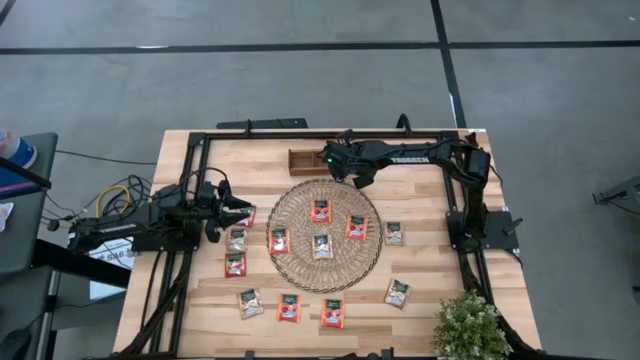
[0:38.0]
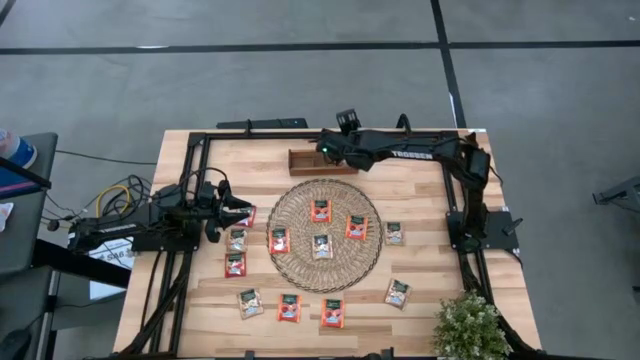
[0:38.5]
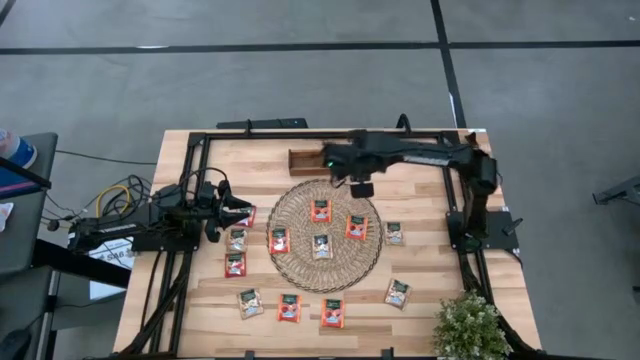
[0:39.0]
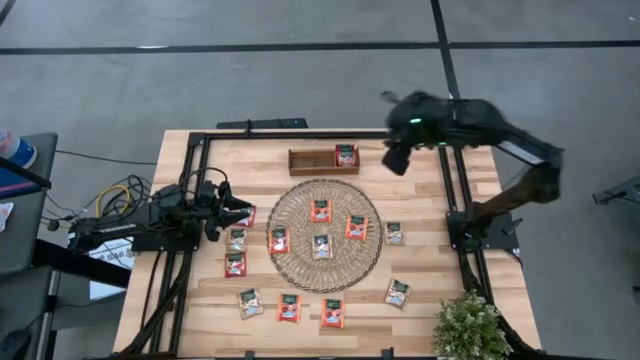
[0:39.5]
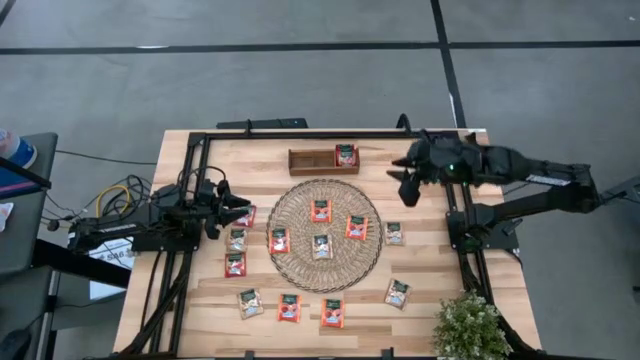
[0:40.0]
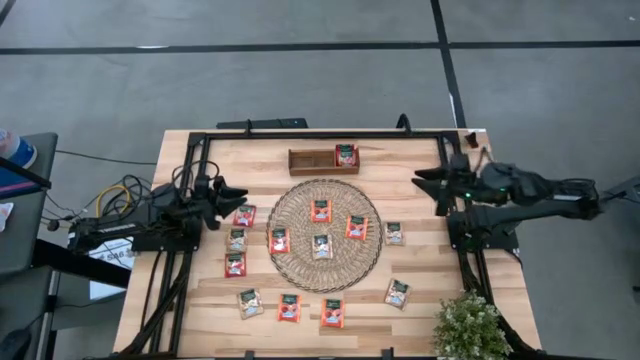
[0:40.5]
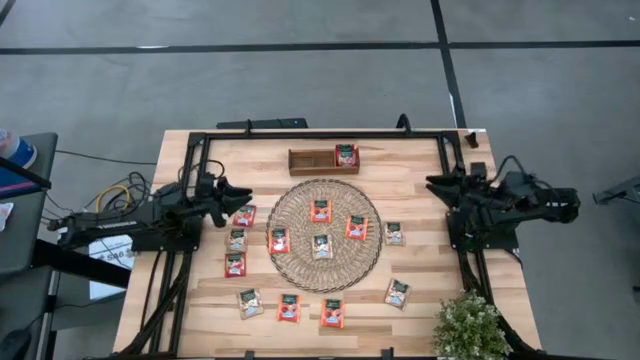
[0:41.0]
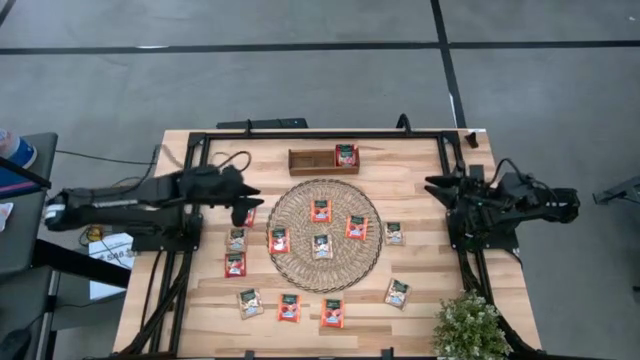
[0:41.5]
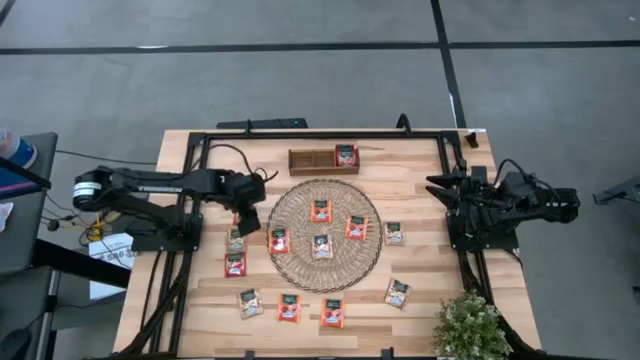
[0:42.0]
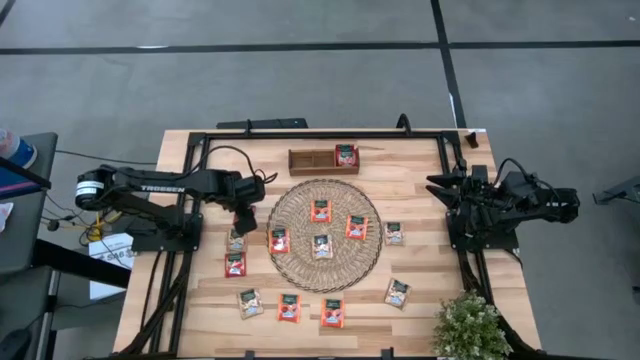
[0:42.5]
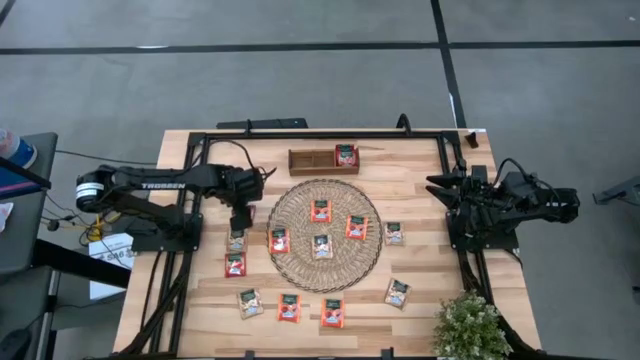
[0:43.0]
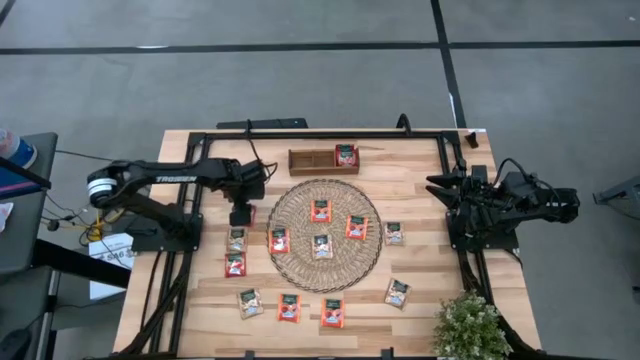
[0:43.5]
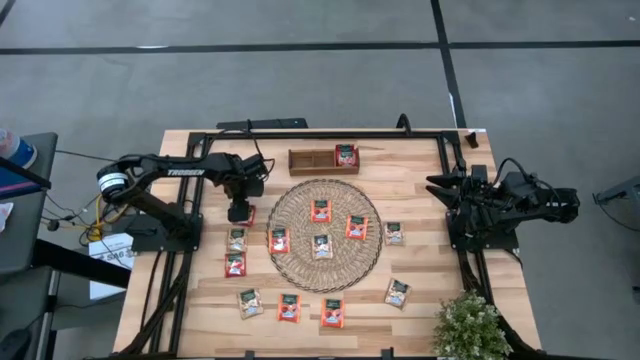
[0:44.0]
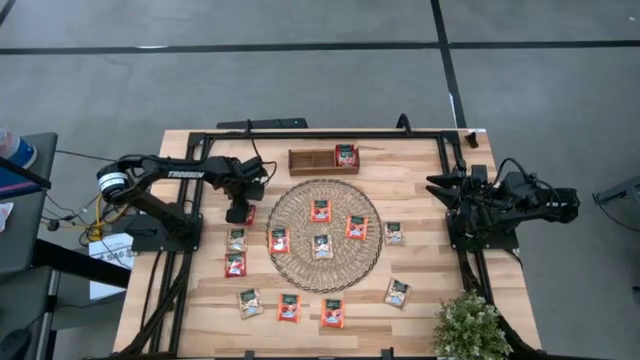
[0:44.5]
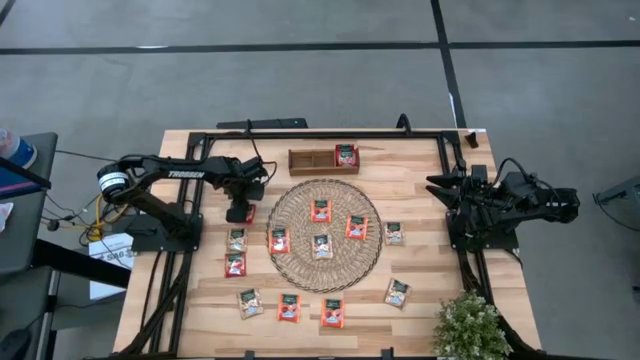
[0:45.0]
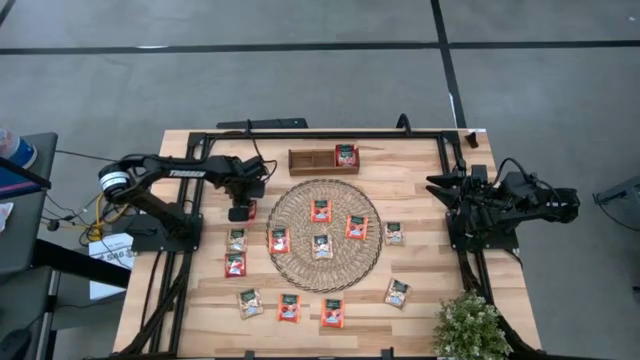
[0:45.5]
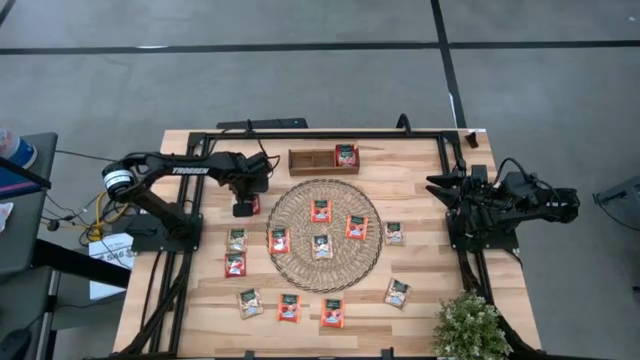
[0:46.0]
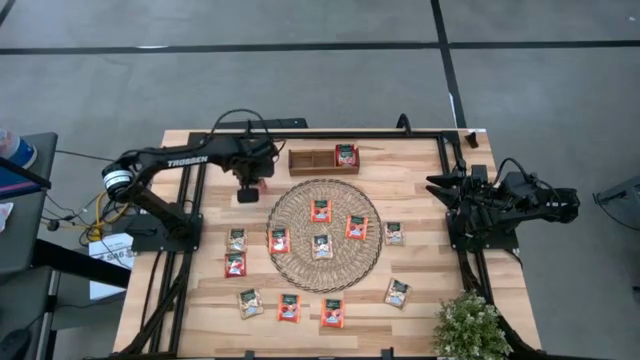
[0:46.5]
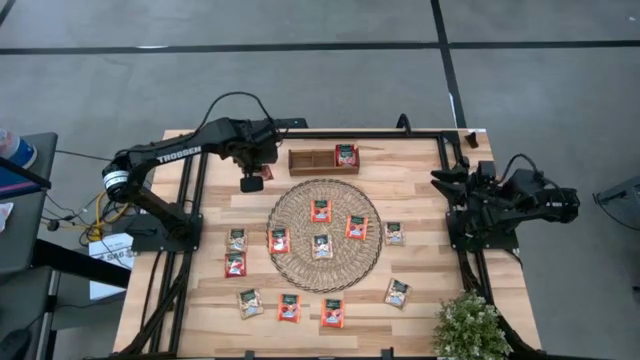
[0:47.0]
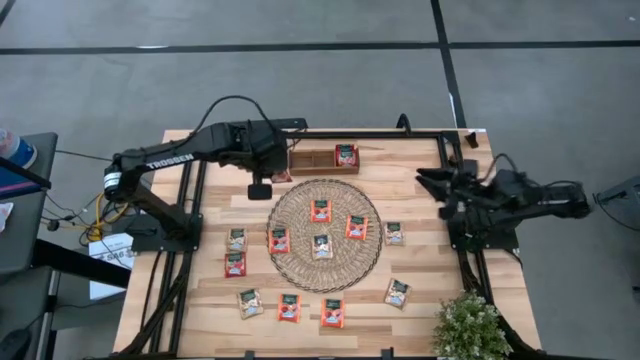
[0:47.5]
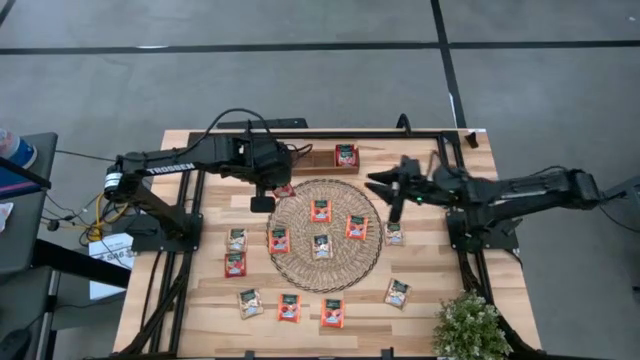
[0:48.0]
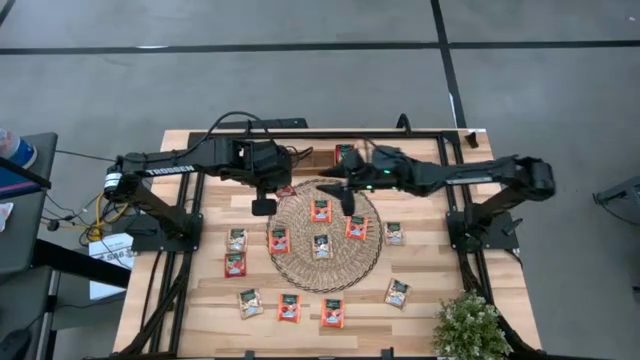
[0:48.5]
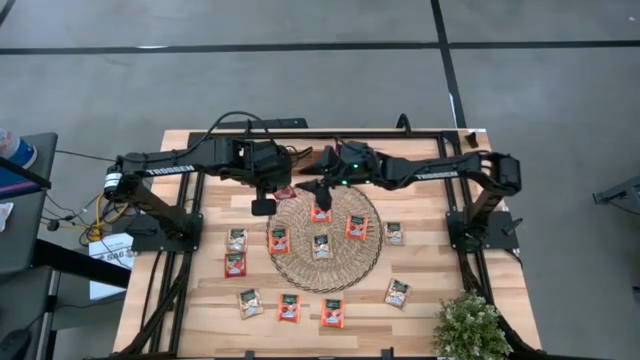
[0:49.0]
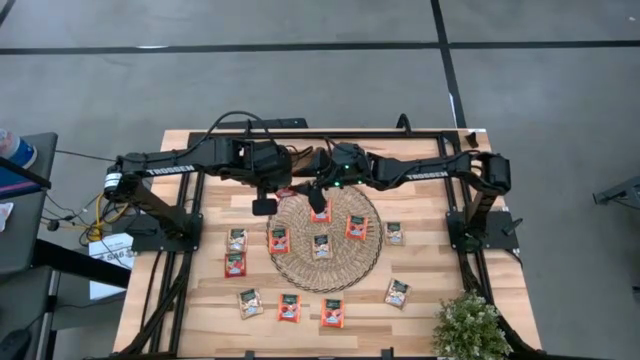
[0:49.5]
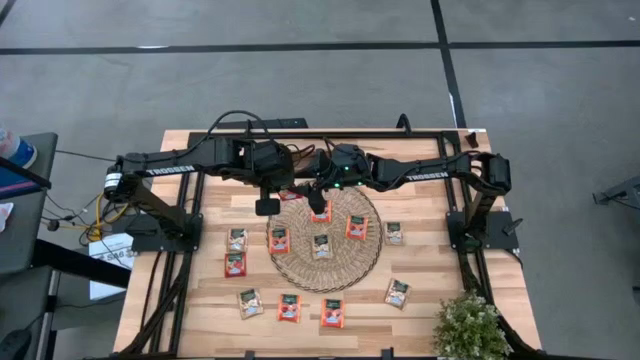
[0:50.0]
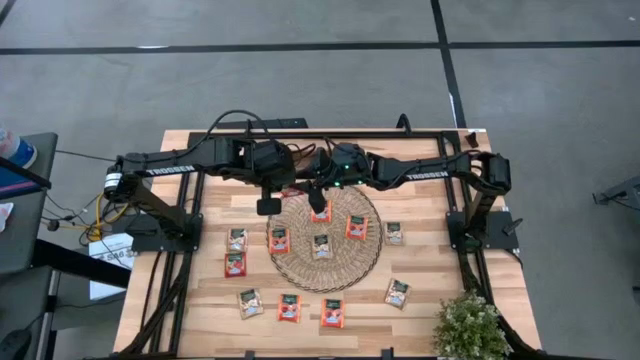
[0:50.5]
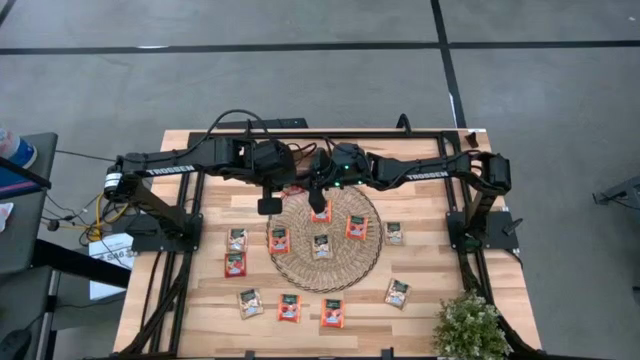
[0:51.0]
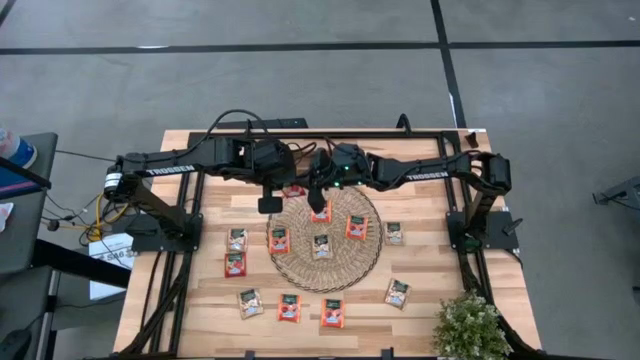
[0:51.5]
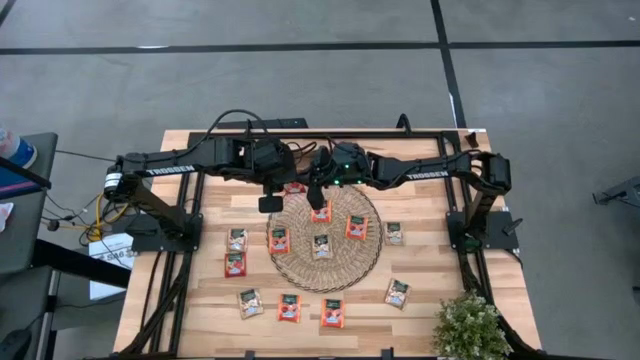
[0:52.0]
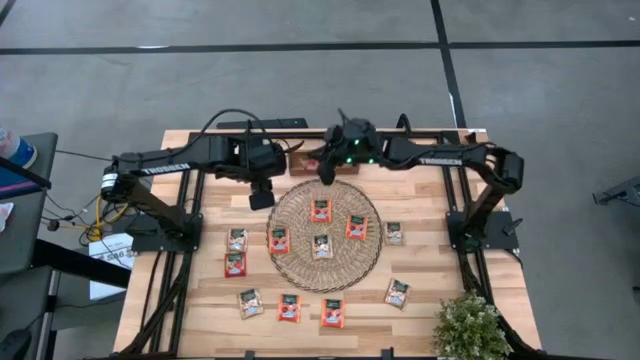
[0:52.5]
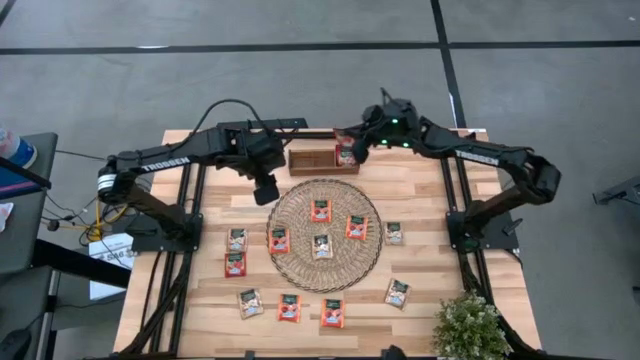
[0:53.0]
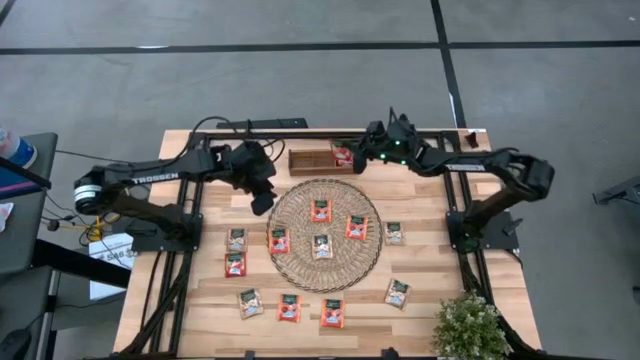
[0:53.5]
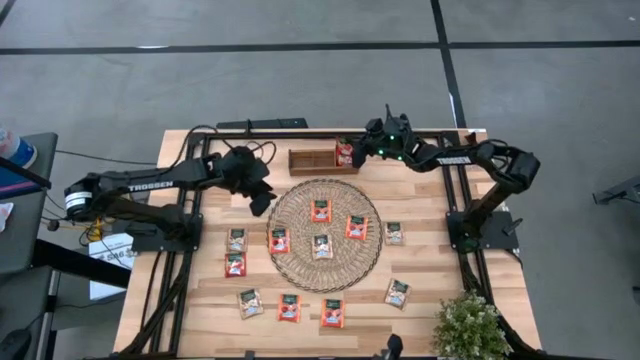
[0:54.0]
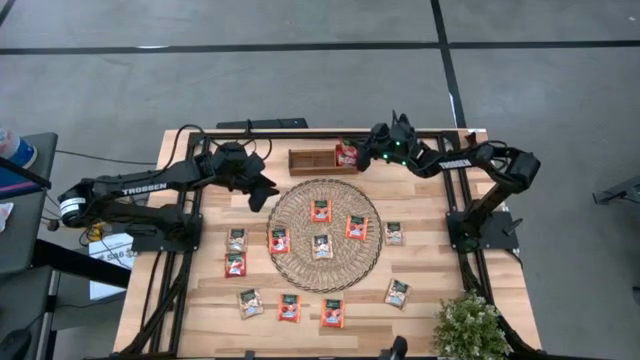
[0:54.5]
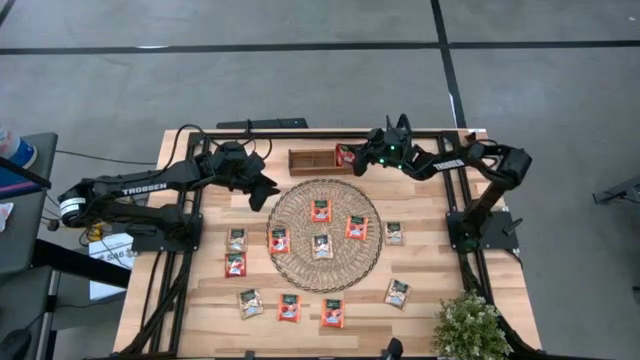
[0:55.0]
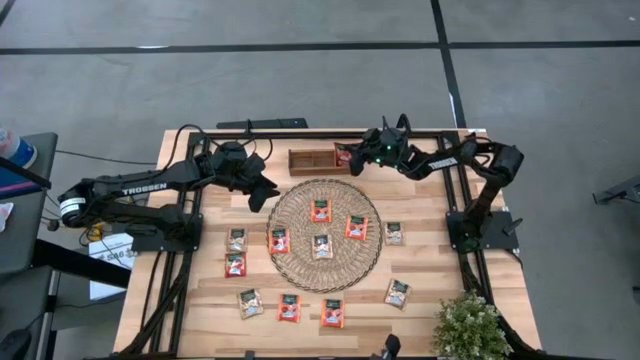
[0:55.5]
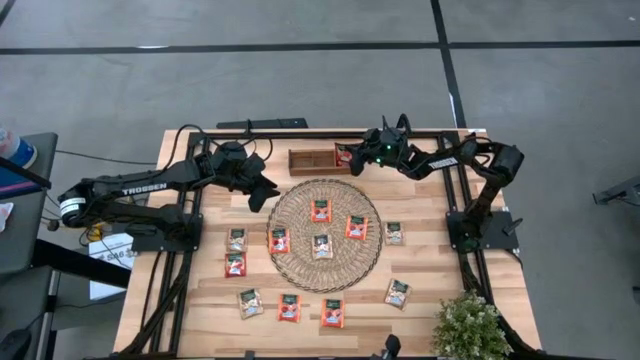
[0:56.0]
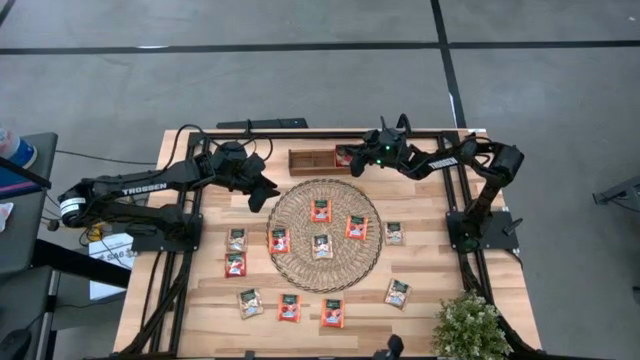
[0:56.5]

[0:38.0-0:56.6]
Task: Pick & Place Tea
Put the red tea bag into the right section of the wooden organizer

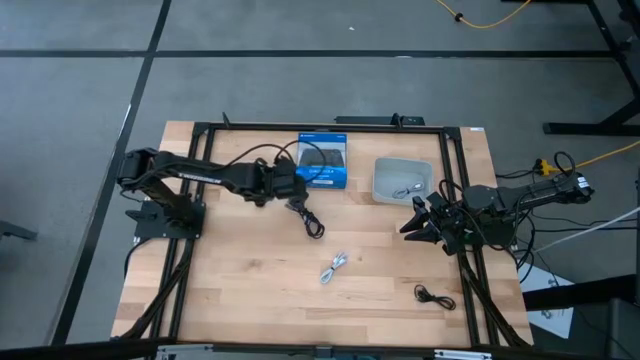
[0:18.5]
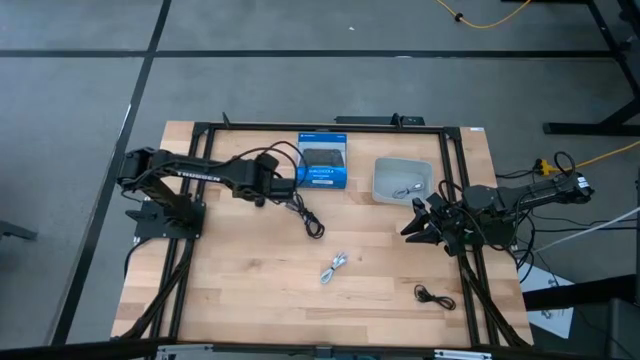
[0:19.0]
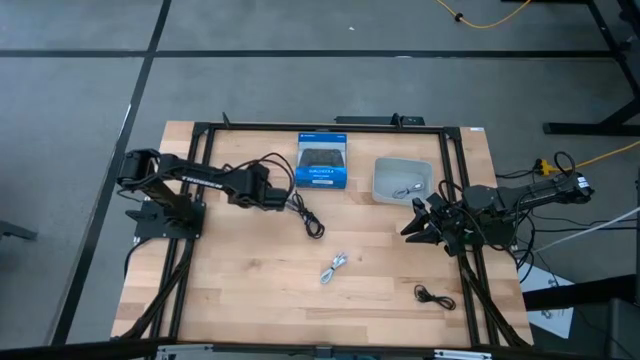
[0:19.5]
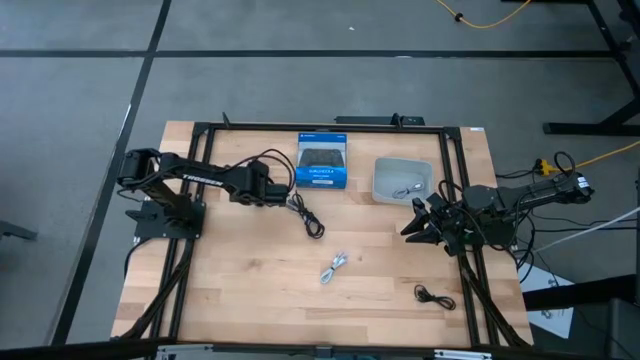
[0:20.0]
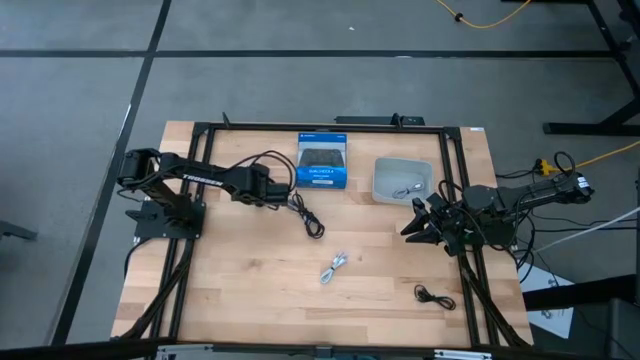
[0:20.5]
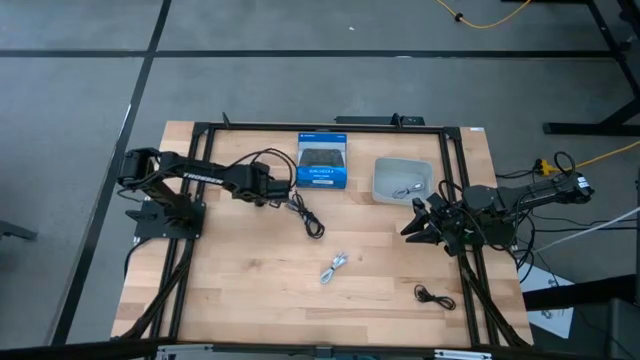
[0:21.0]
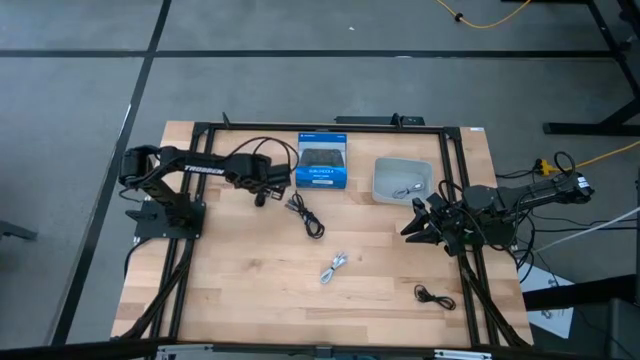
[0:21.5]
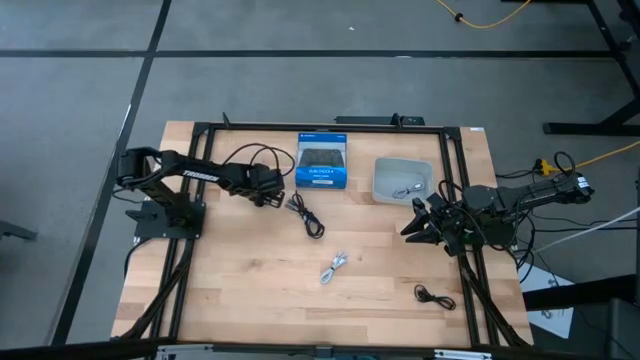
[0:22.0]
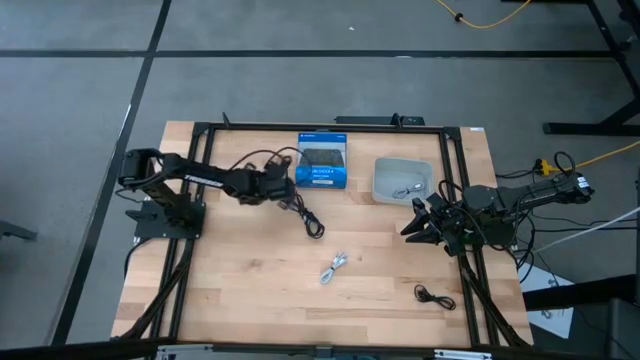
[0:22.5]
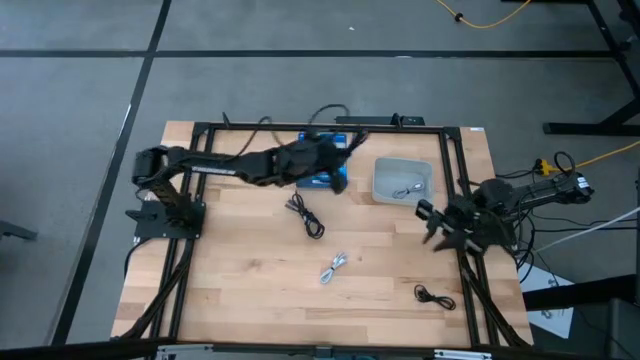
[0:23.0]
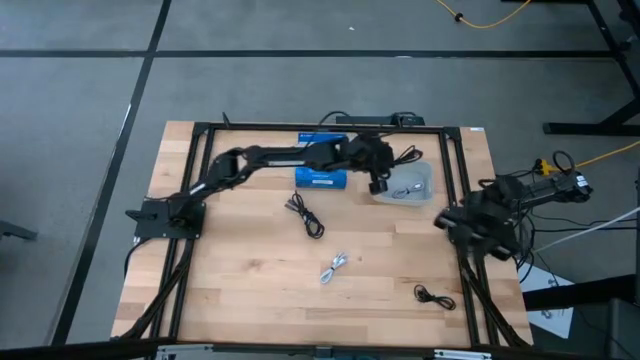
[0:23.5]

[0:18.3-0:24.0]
Task: Pick and place USB-C Cables
Put the top black charger cable into the gray bin
